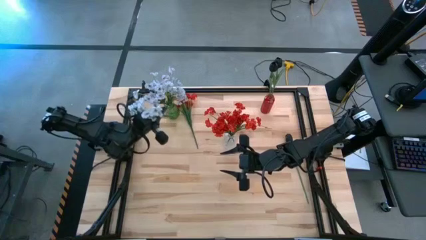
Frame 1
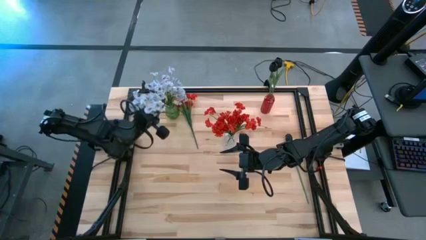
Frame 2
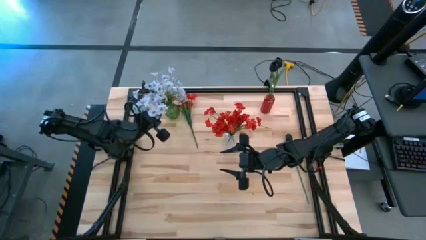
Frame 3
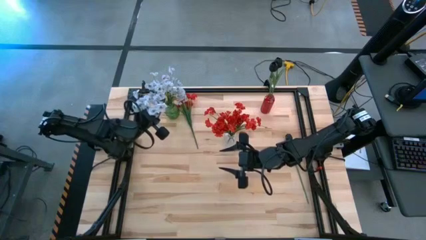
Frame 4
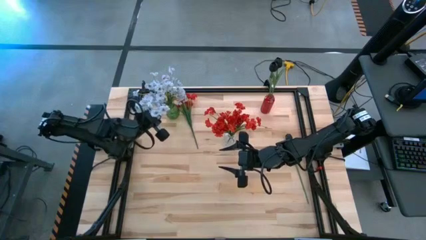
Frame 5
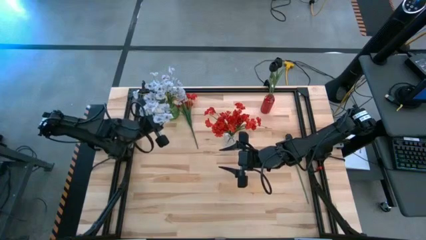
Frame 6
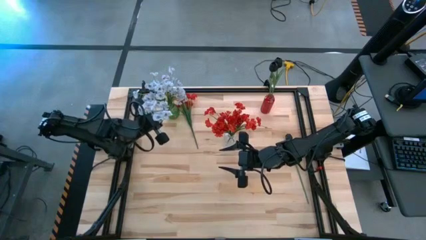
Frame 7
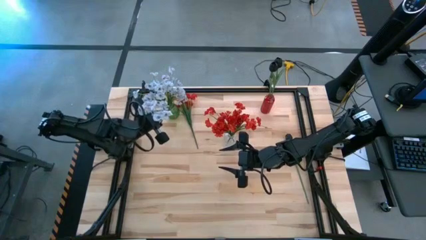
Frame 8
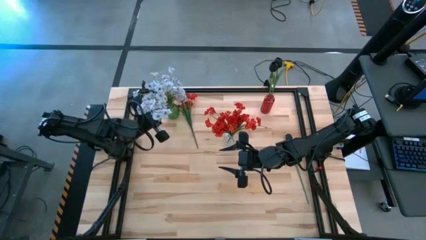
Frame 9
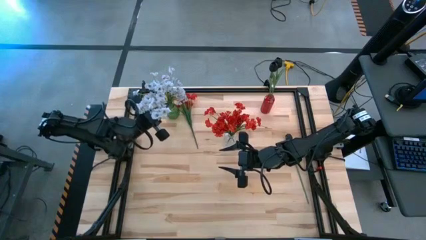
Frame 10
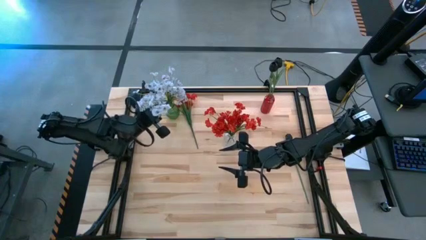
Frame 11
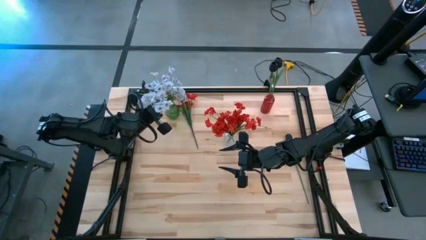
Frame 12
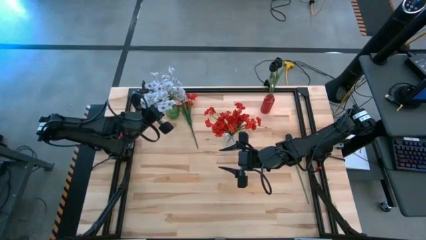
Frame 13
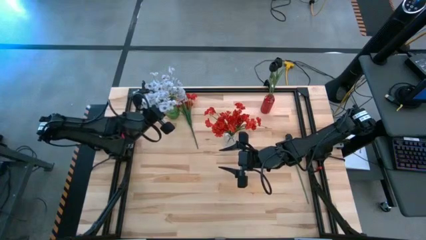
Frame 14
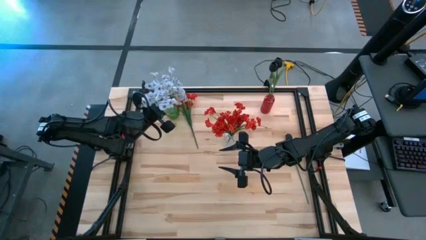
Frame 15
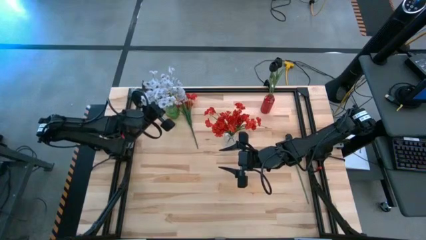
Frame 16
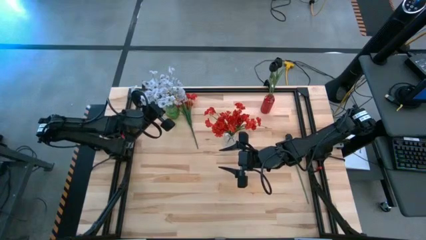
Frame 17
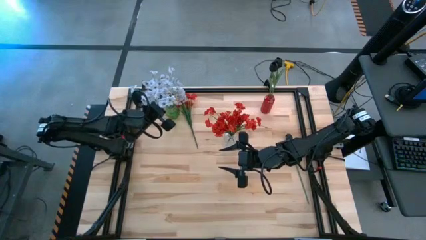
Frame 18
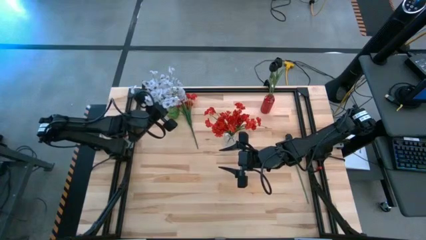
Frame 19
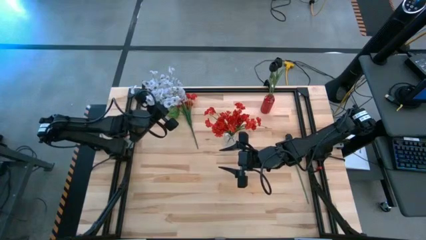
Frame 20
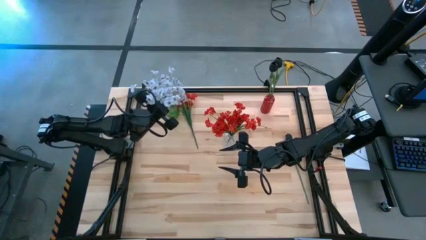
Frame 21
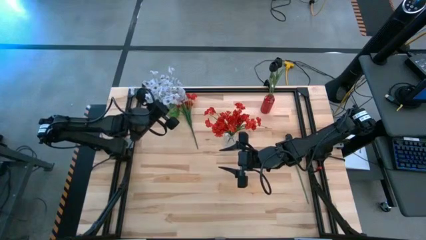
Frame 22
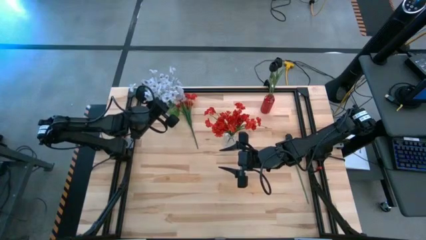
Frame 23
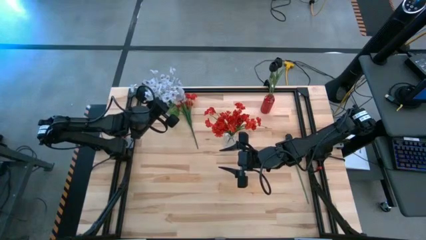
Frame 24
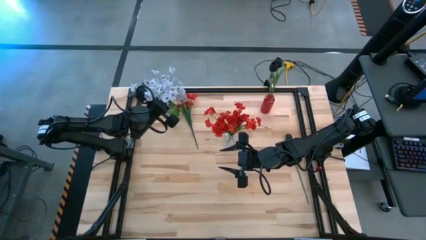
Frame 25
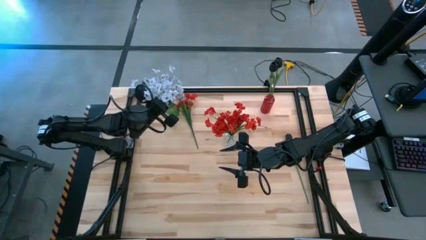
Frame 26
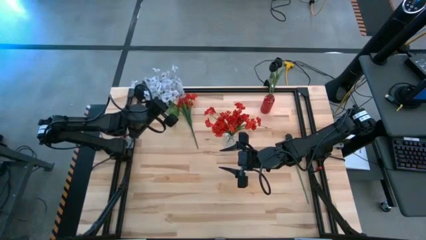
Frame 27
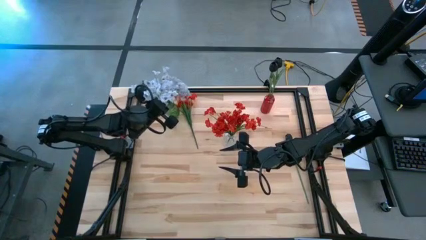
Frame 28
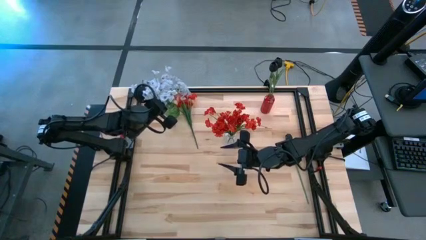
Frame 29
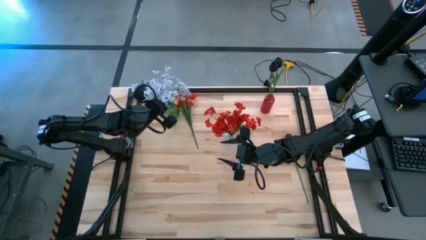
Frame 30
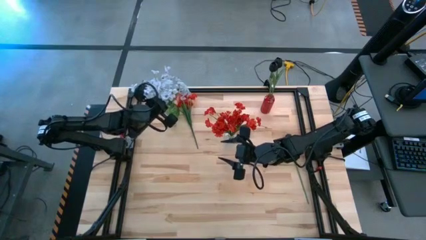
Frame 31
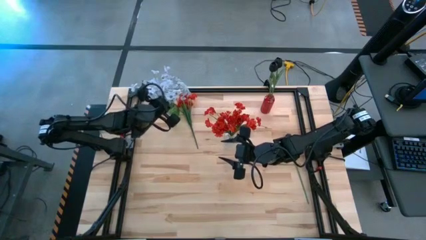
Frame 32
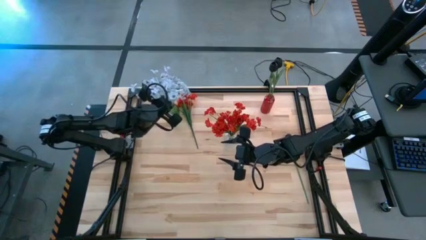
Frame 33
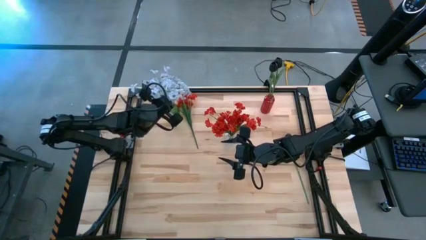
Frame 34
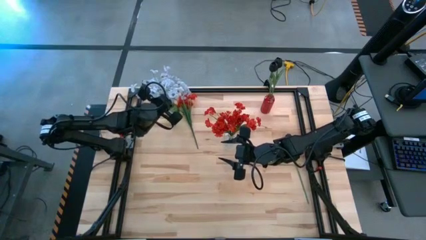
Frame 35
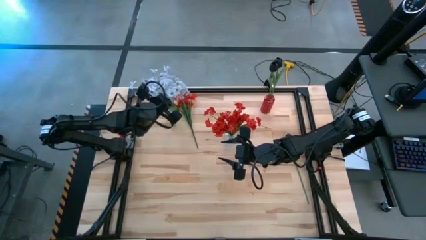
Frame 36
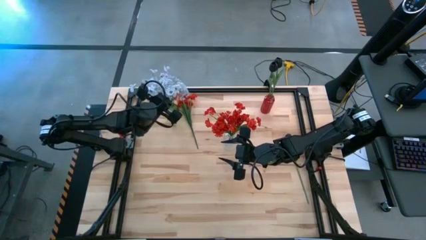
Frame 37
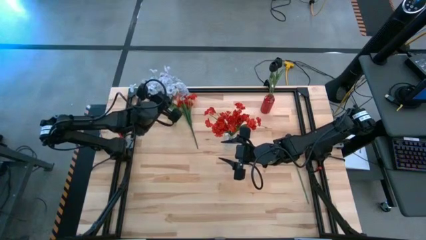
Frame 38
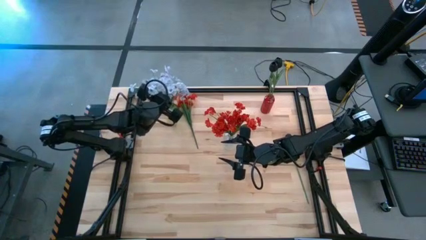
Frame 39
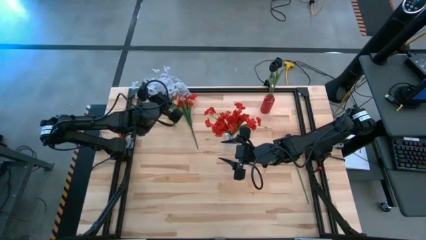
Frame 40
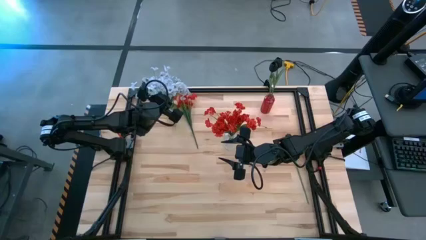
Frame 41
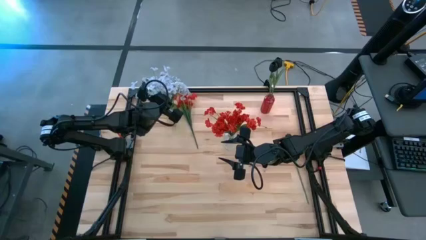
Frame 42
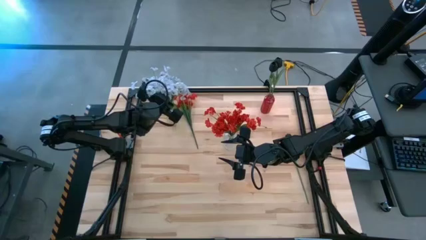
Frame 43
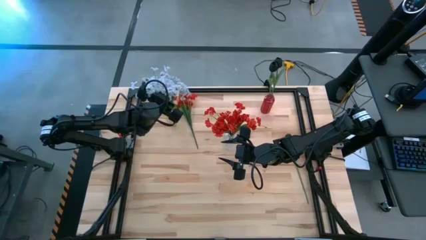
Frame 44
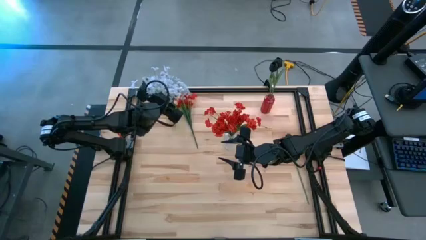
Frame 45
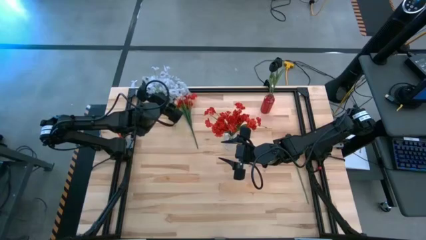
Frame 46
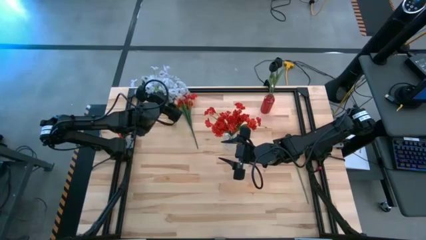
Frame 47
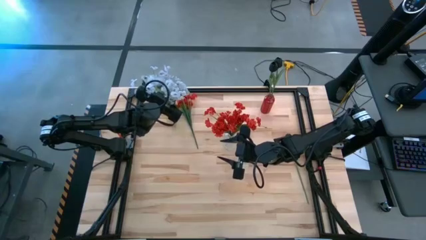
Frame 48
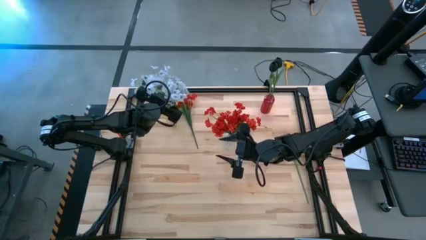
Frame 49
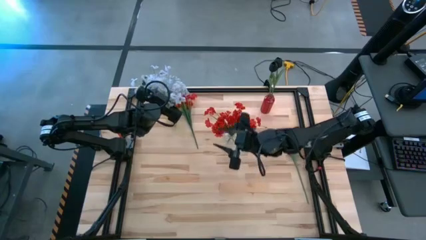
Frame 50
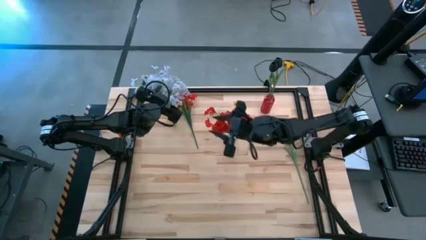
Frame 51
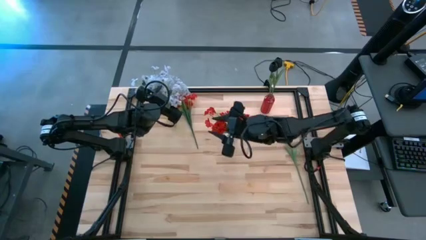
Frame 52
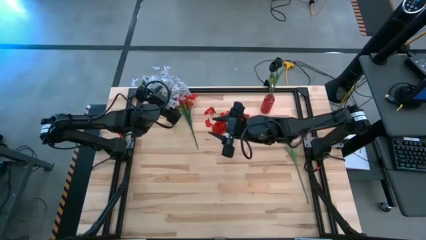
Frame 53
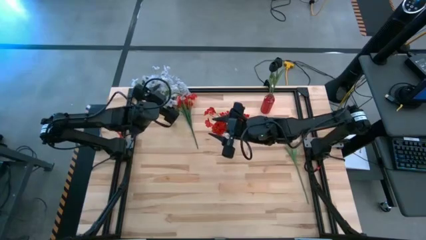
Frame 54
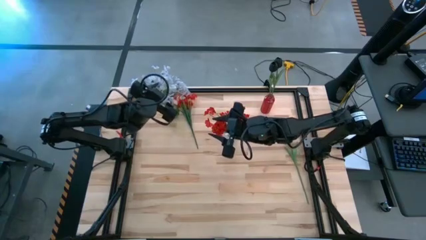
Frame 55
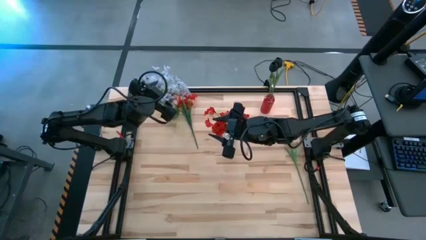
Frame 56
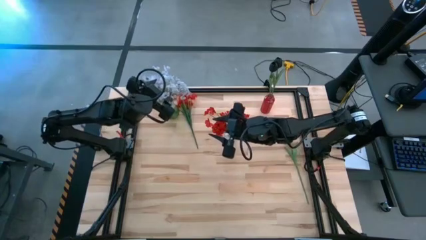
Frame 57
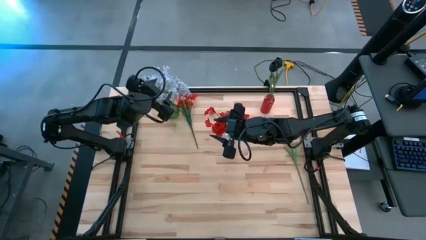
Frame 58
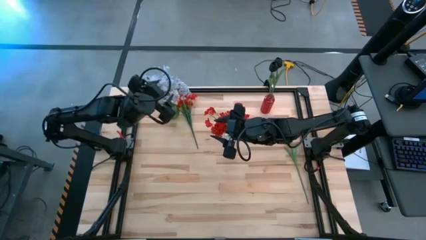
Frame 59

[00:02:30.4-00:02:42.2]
Task: Sort flowers into vase by color
Put the white flower into the green vase

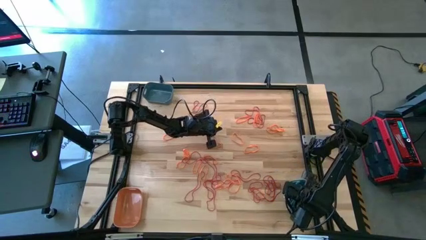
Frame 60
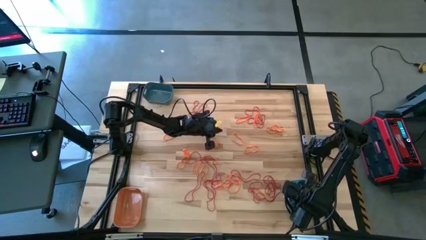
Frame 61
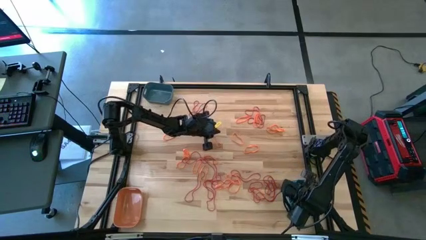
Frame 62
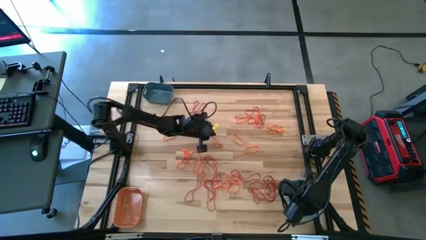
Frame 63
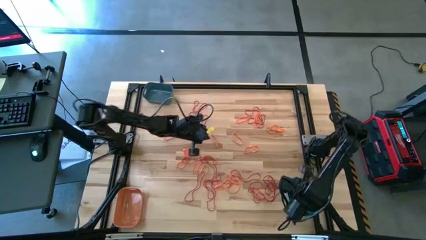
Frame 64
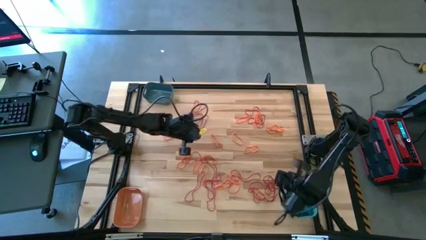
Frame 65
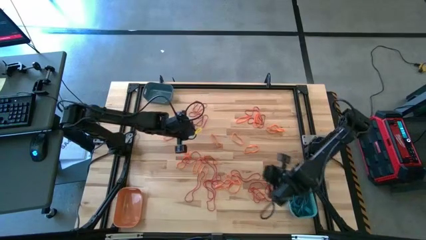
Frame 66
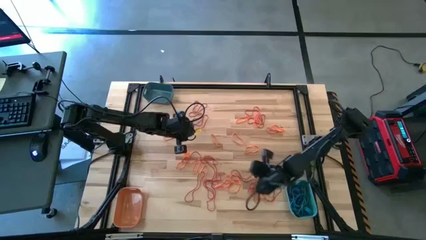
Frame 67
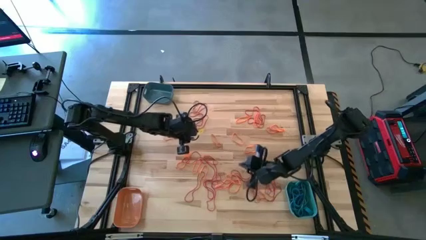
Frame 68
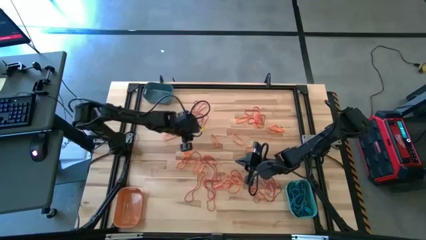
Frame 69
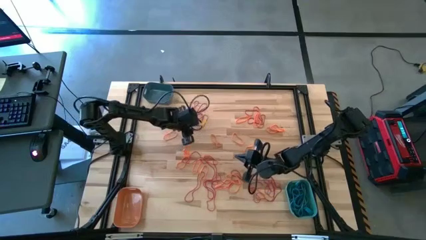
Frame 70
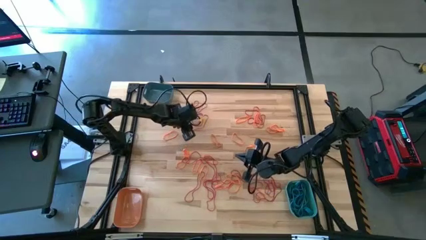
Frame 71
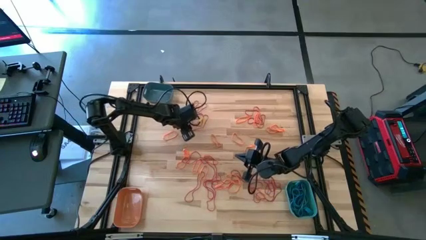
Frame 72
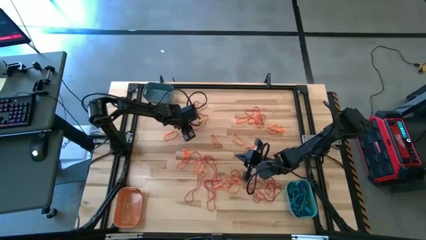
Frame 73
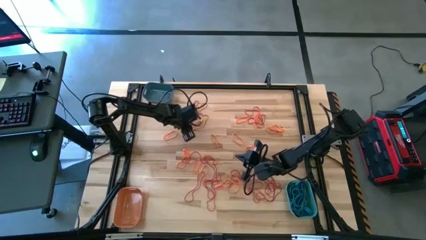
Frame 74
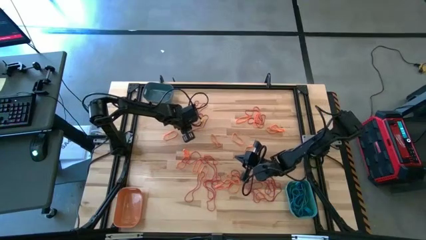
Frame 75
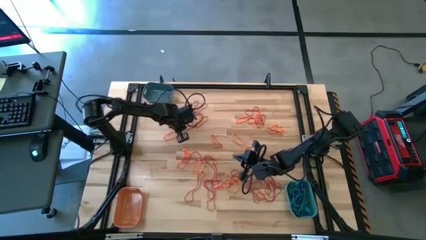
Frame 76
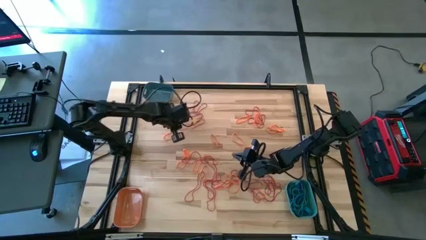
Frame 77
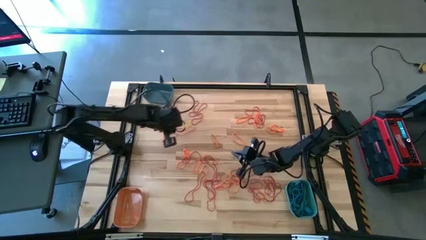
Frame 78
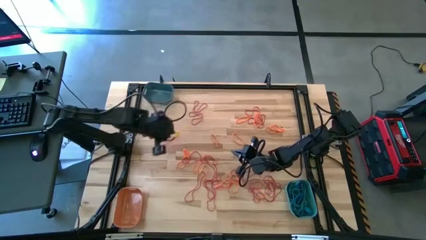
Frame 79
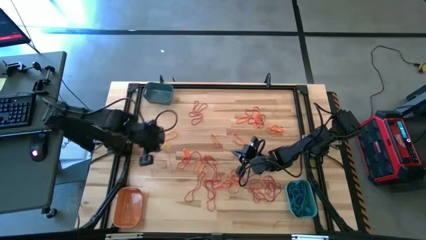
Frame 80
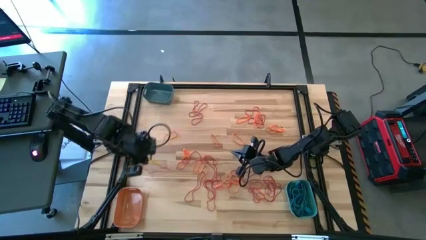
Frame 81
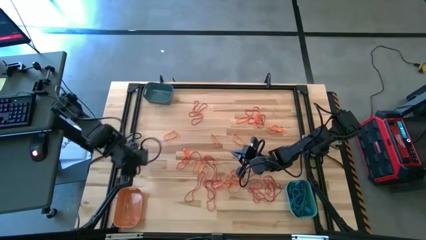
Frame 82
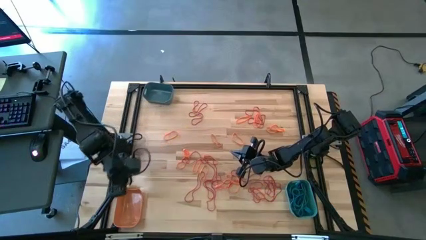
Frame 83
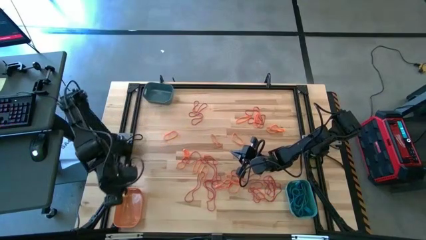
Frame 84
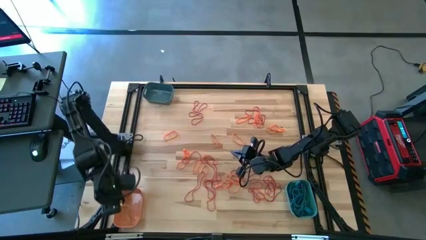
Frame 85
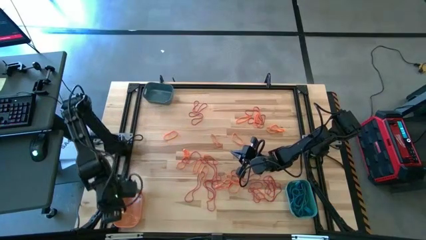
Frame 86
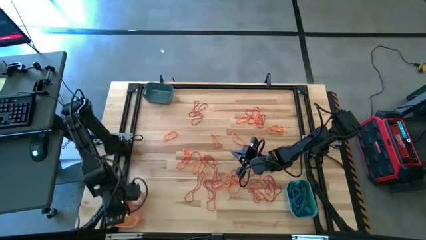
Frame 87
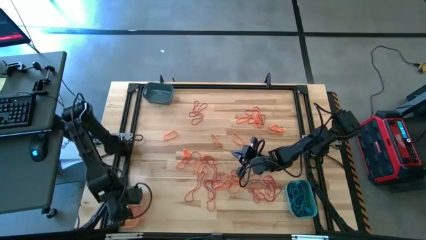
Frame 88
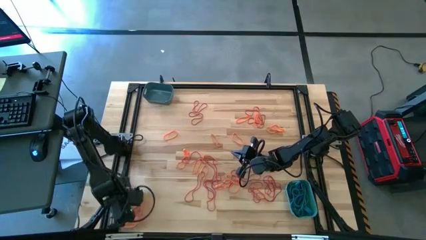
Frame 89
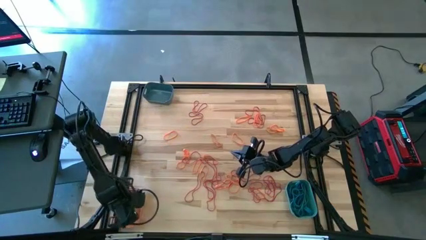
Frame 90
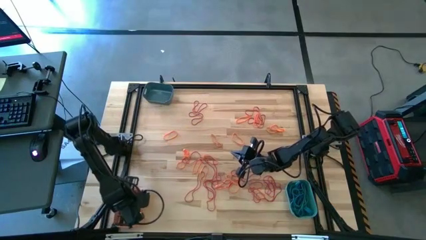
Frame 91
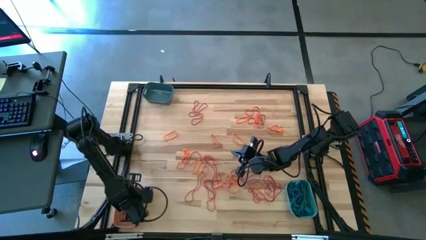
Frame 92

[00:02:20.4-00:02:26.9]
Task: Sort rubber bands into baskets
Put the red rubber band into the orange bin
